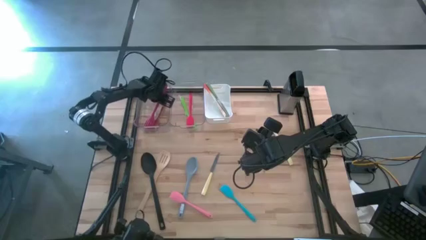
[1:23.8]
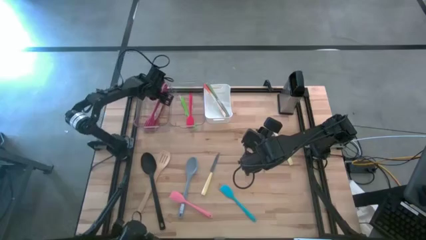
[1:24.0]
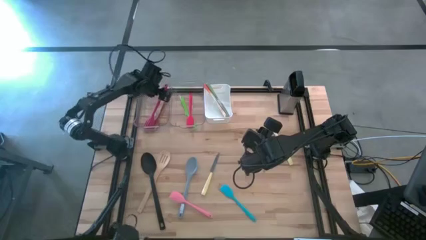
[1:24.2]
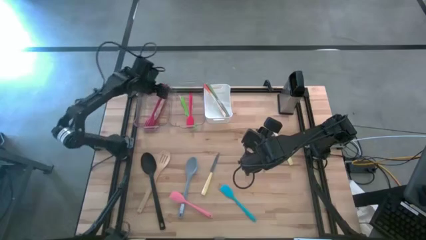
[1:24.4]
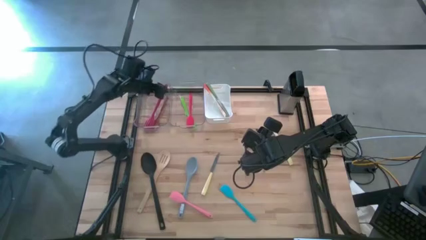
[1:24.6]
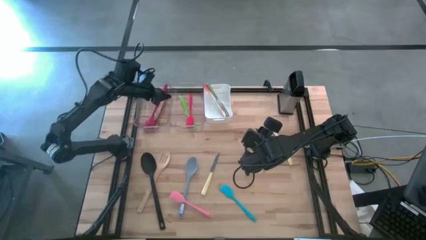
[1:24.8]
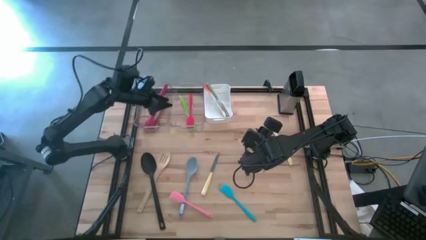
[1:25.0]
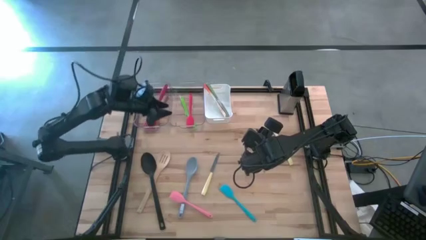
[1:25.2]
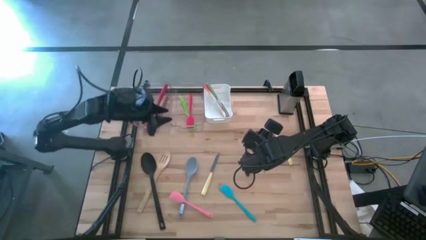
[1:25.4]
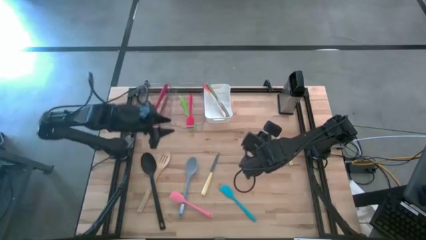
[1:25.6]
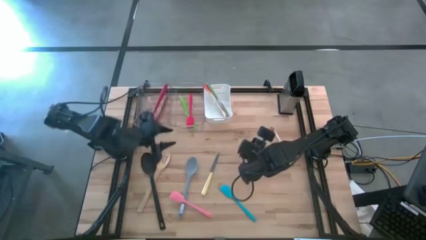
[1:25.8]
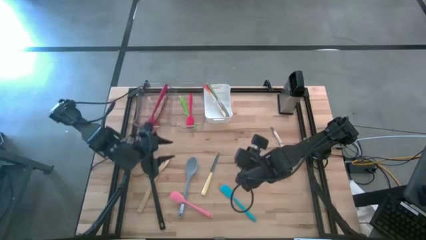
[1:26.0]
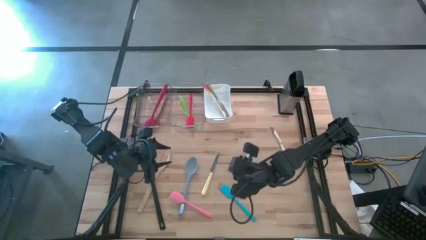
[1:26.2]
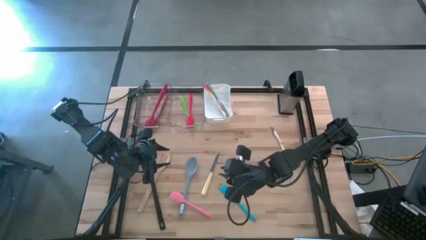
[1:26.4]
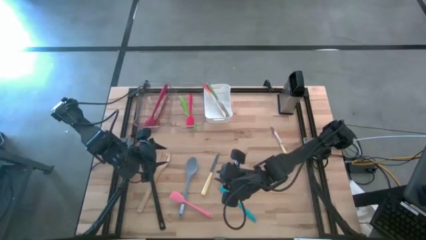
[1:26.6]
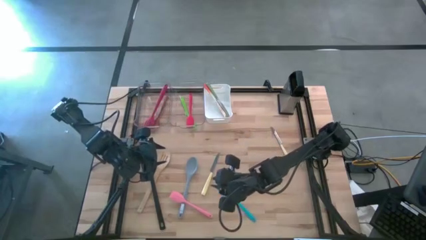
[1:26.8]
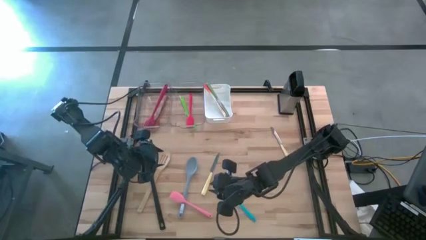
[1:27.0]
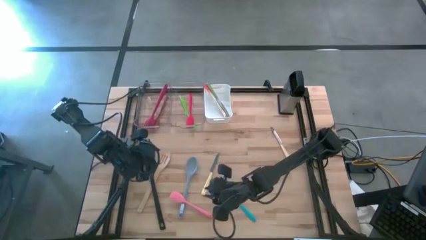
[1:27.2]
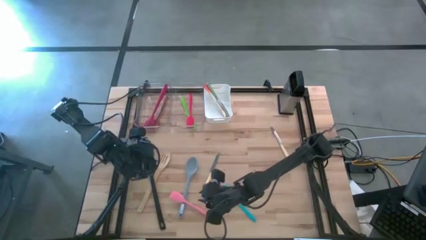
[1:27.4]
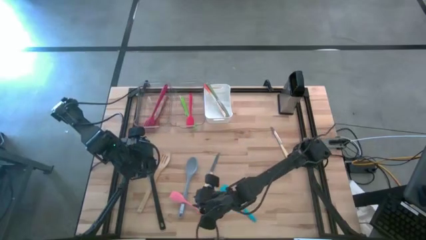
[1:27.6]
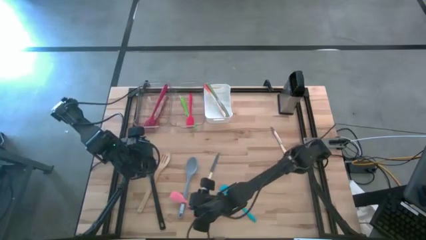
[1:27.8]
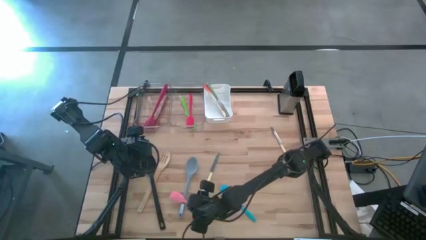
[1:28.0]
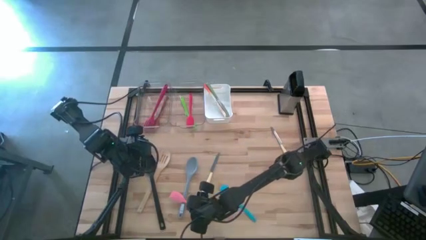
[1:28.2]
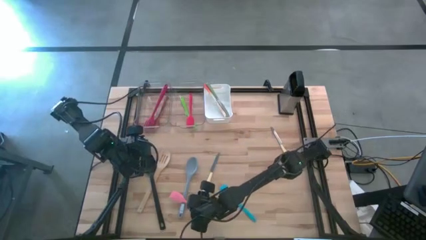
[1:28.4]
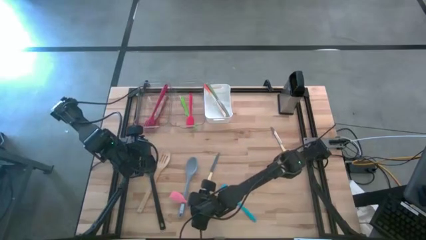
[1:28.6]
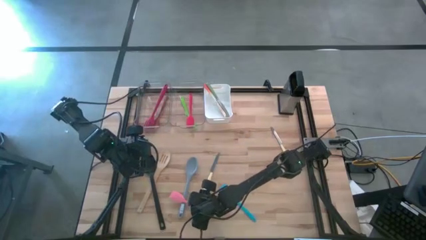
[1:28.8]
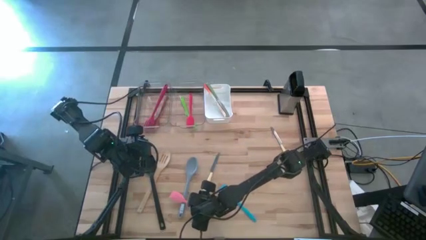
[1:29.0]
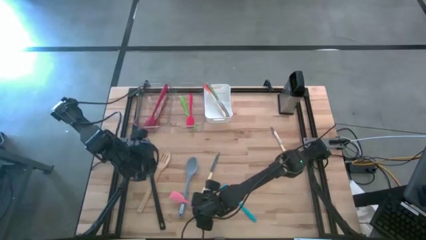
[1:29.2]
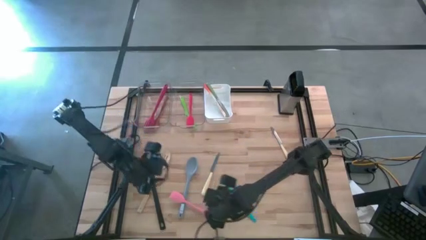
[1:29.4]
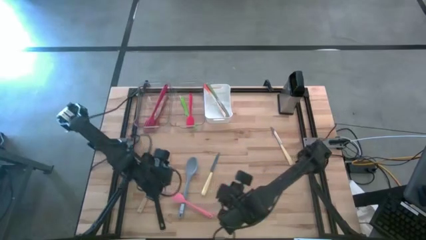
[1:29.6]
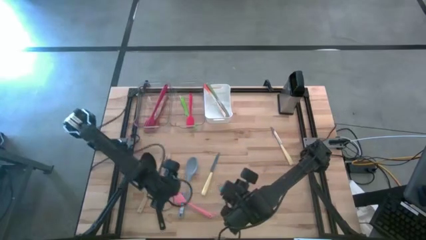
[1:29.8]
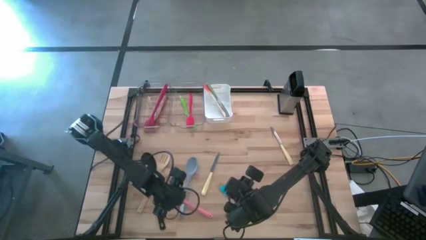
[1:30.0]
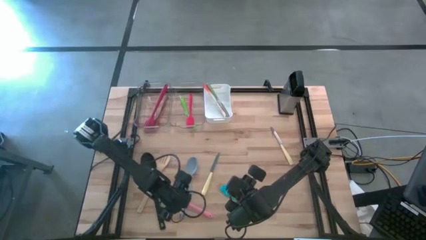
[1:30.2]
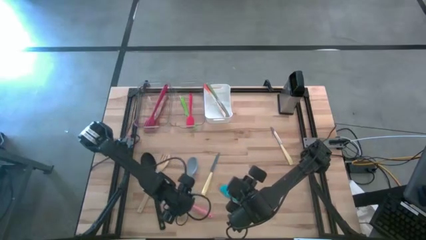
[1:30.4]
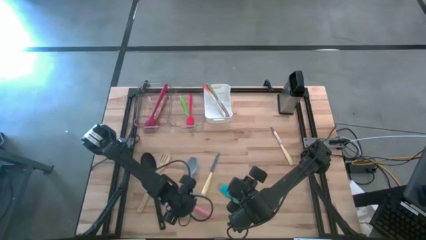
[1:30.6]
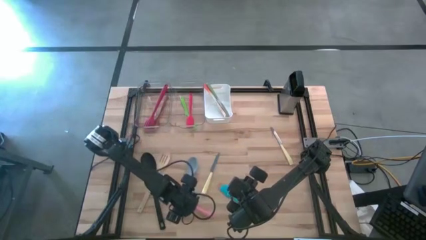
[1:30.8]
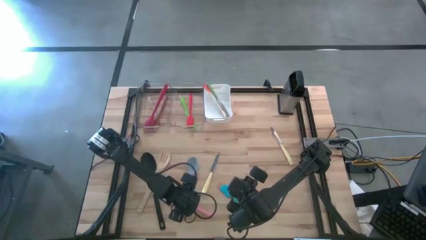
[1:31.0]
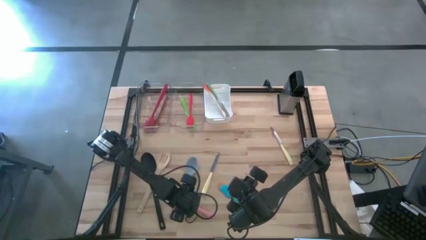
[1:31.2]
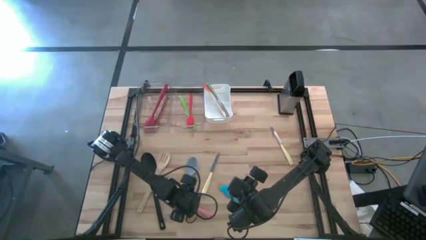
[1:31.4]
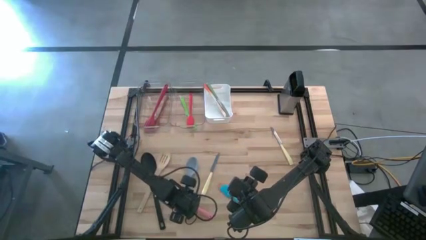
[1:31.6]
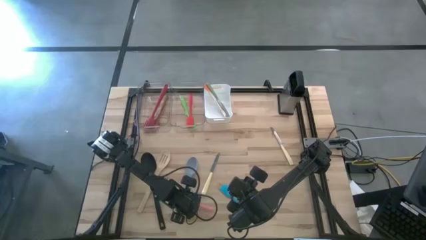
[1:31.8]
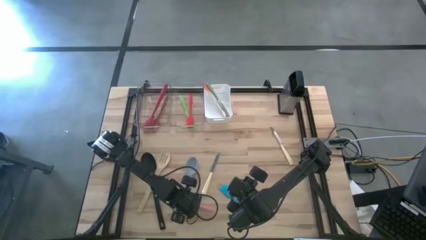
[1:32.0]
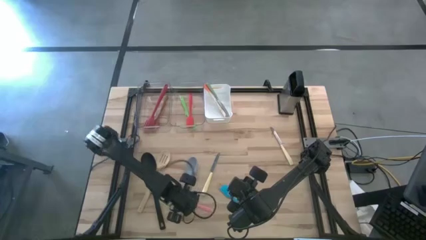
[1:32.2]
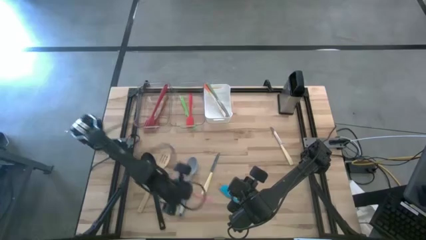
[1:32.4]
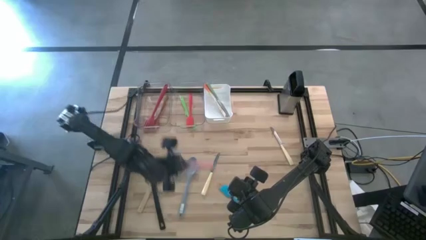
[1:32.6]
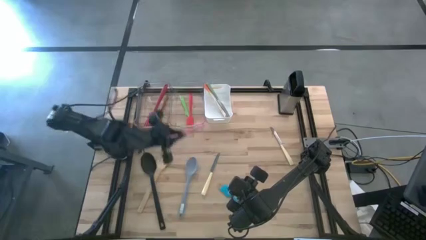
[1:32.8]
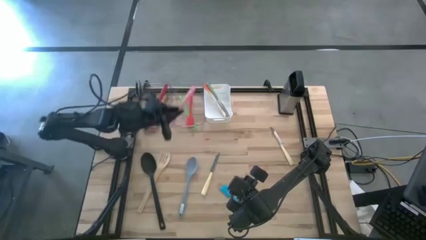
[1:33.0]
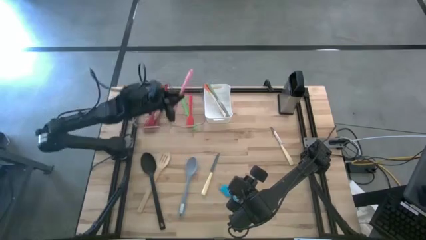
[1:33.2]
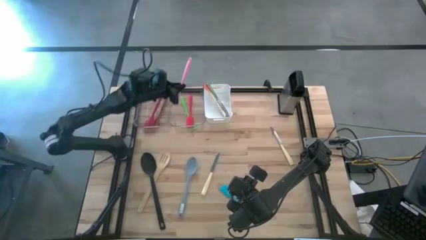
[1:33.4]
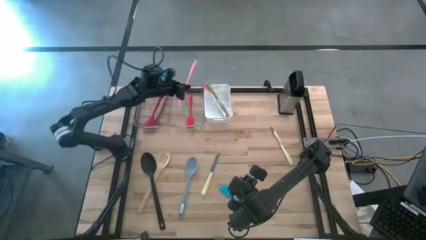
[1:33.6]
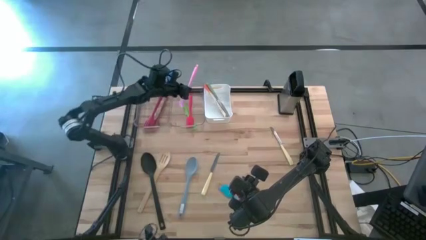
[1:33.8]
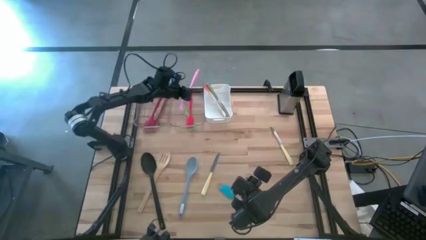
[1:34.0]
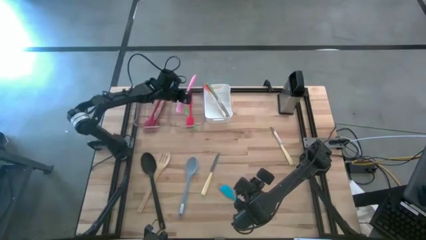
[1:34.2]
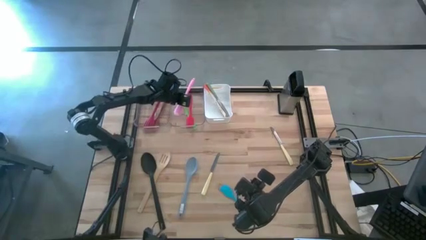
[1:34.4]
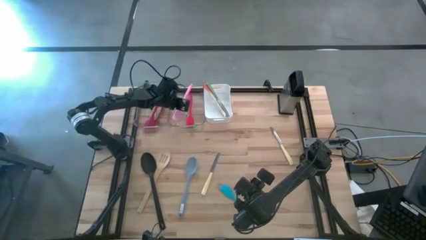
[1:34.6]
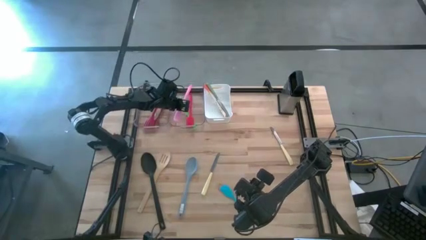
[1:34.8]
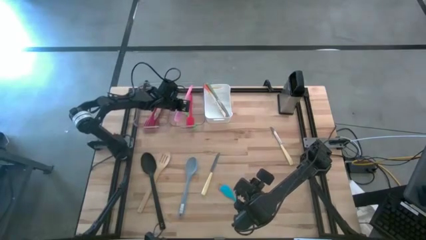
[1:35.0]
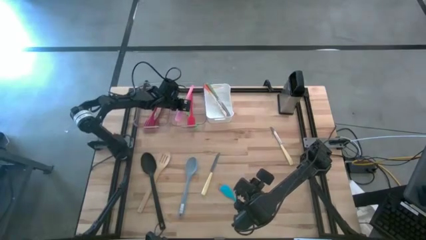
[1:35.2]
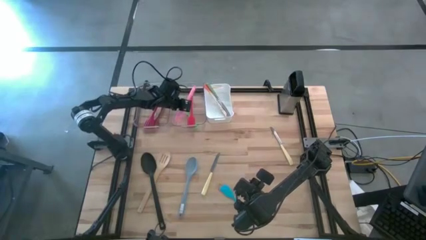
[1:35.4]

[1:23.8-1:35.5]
Task: Pick & Place Kitchen Items
Put the pink spatula into the right transparent bin

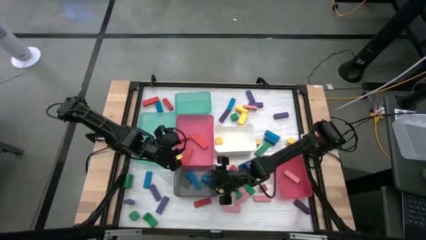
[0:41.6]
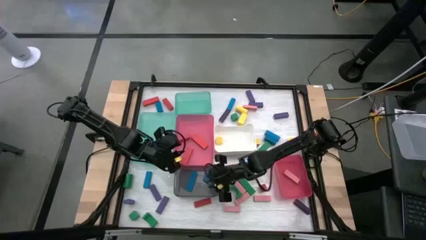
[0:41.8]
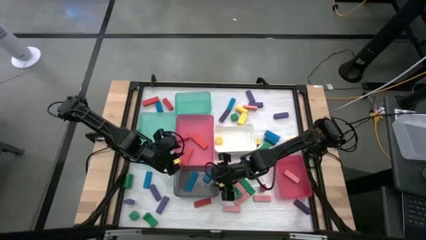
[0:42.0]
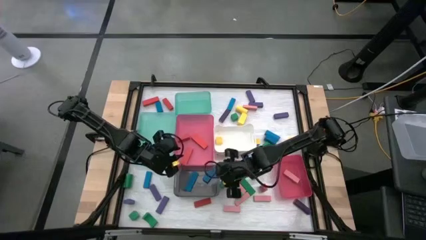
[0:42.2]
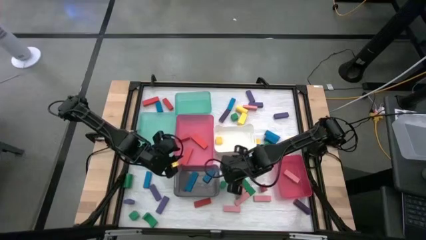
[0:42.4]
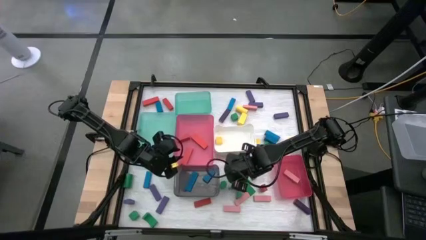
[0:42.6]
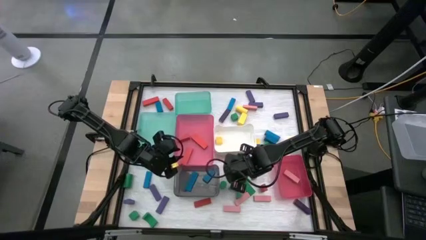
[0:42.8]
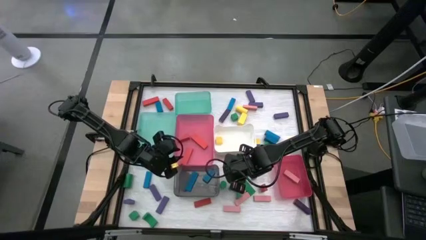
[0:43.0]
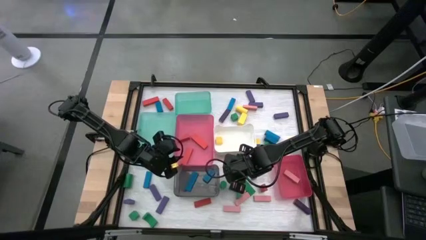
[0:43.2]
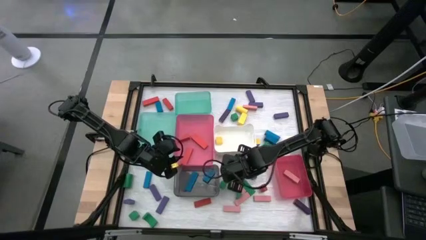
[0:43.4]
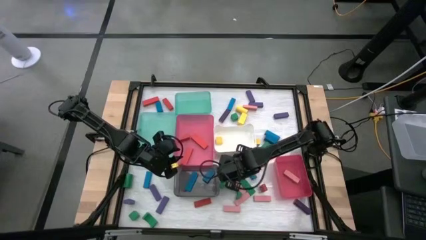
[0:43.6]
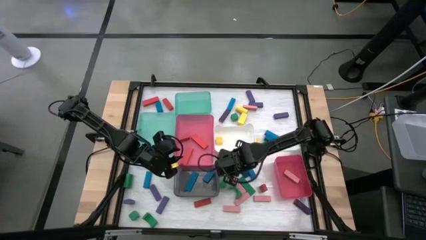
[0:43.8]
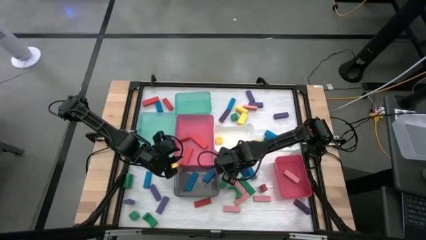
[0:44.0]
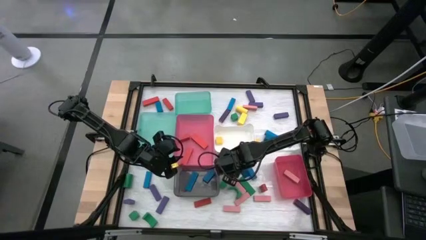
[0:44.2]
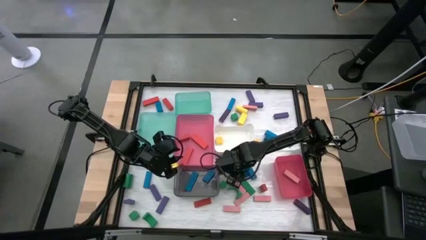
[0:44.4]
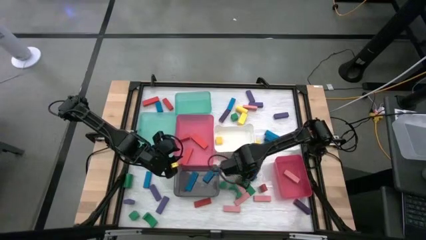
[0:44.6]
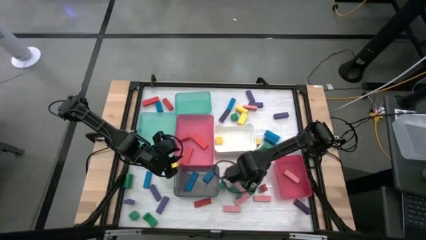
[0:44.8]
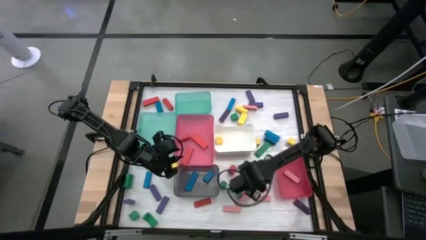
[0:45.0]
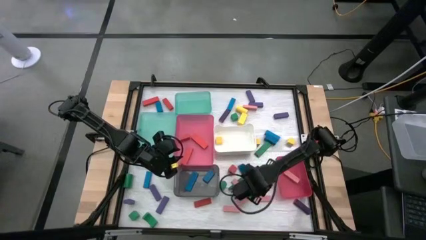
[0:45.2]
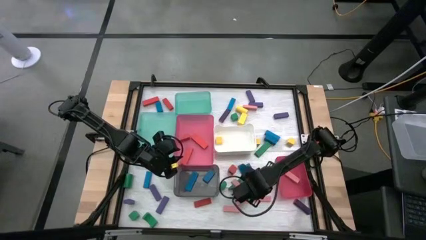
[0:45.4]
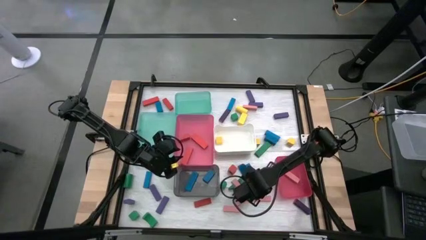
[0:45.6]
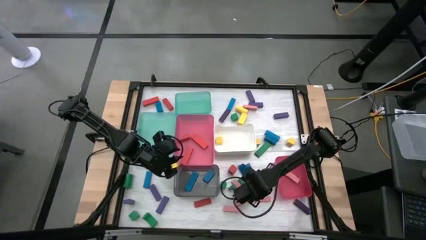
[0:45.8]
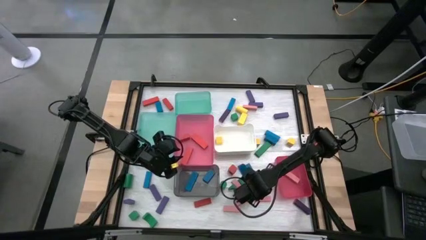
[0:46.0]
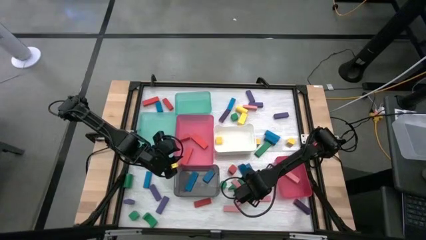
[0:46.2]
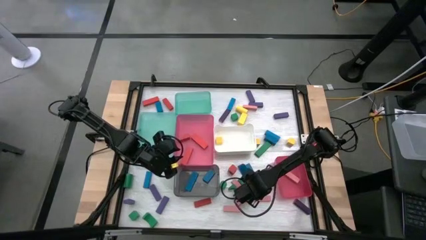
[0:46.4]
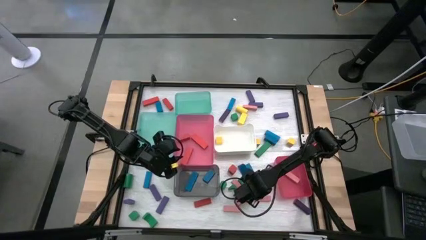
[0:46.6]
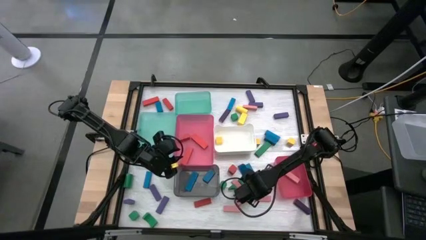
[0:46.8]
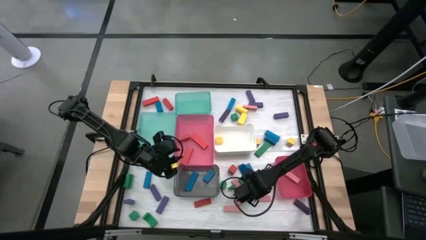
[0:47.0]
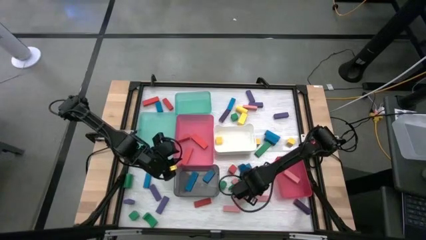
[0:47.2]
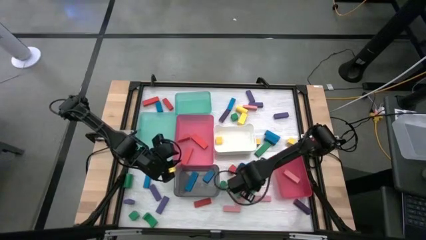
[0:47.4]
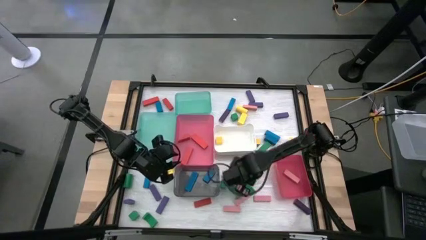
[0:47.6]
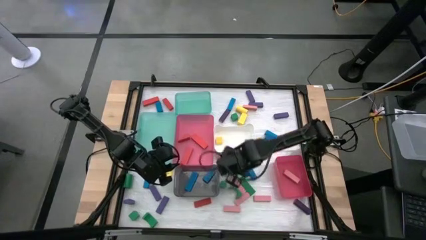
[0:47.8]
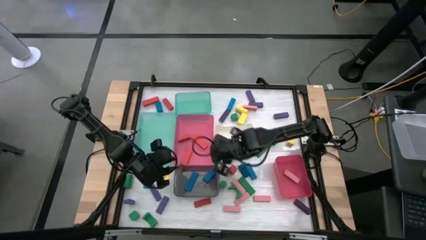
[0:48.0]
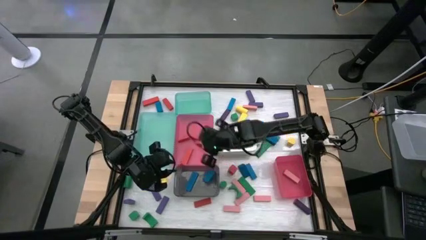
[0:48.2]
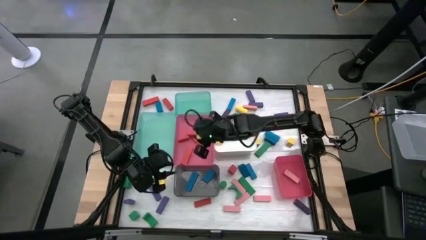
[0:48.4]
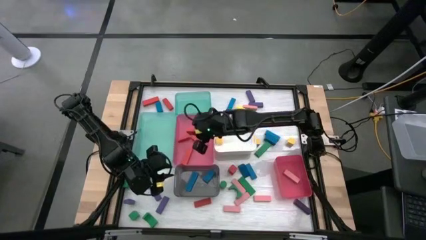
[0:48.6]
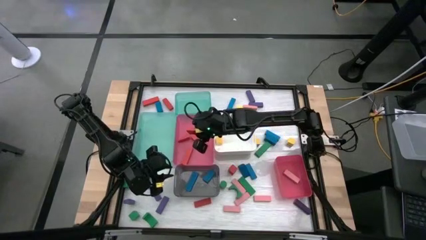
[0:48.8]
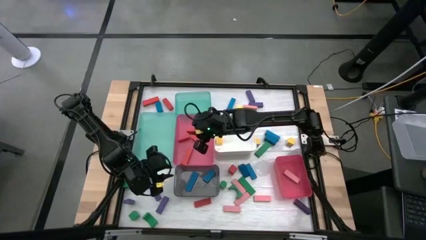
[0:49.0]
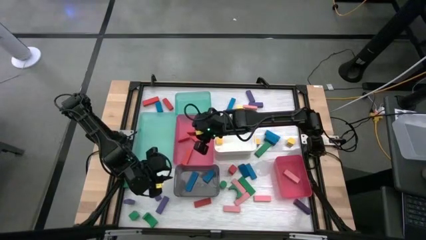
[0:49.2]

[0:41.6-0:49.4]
Task: Sort blocks
Put the red block into the top pink bin
